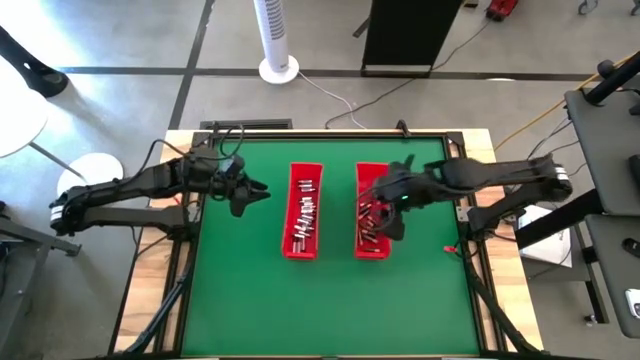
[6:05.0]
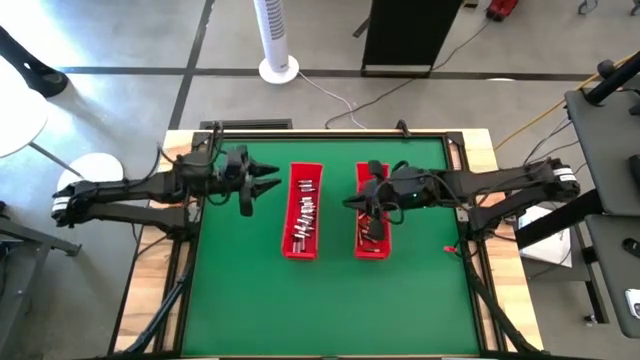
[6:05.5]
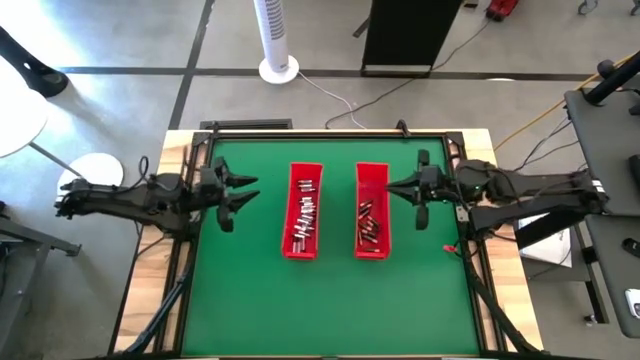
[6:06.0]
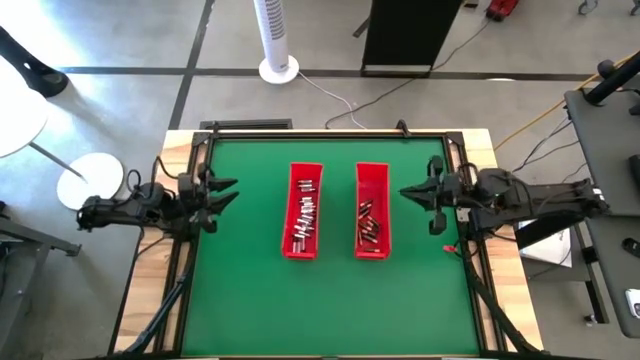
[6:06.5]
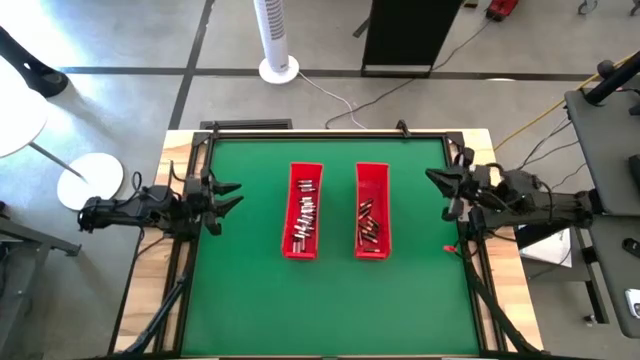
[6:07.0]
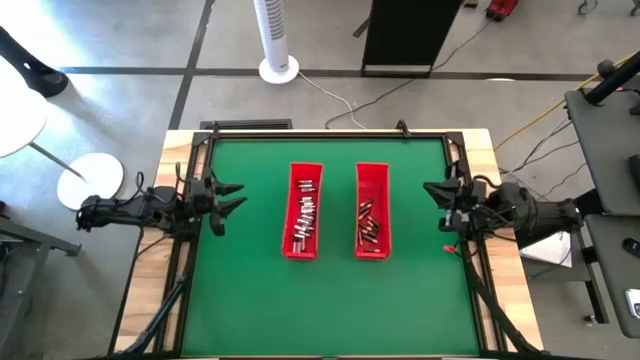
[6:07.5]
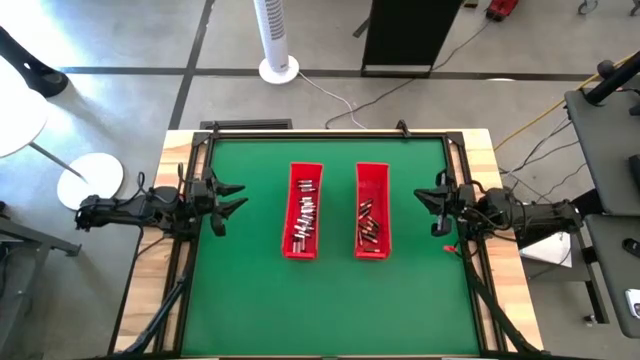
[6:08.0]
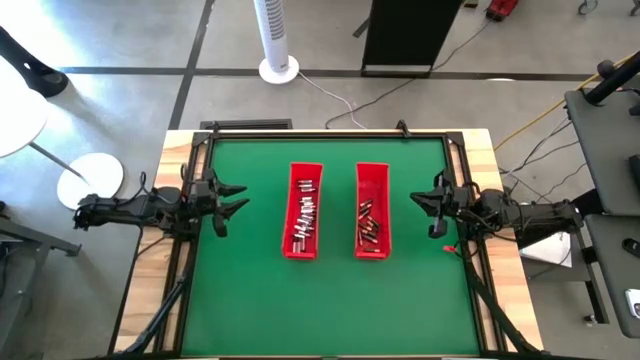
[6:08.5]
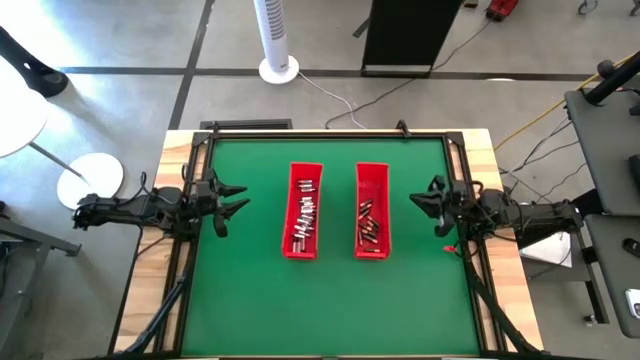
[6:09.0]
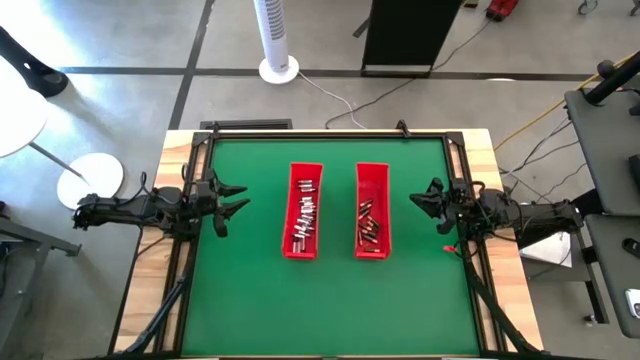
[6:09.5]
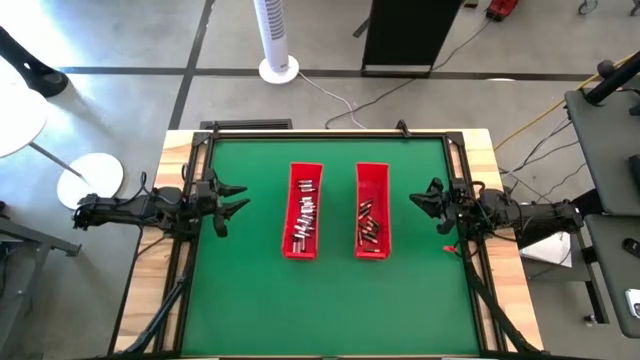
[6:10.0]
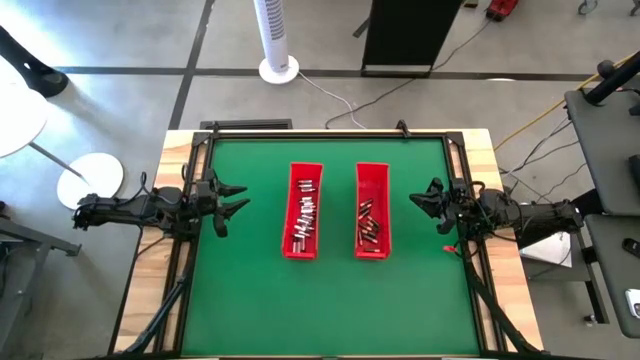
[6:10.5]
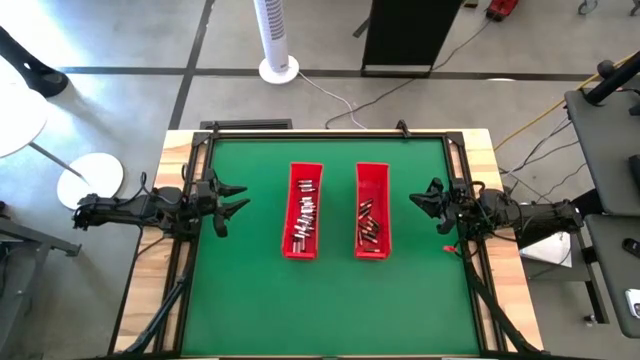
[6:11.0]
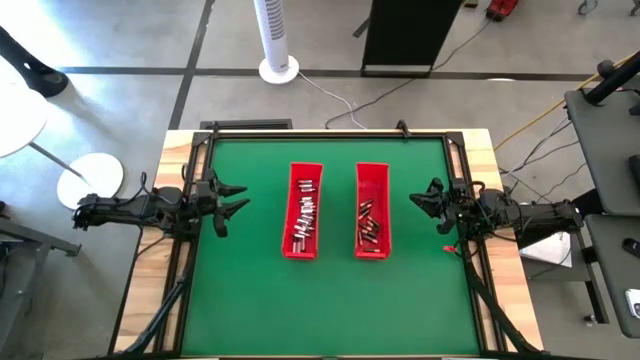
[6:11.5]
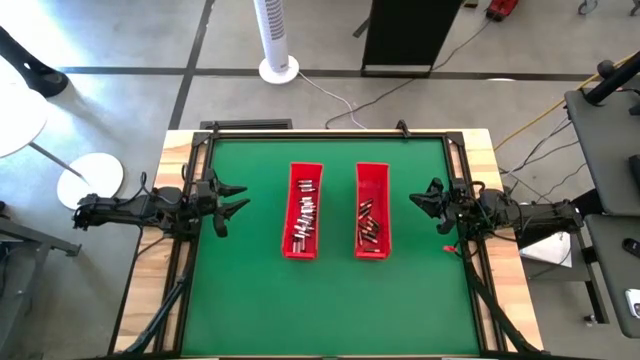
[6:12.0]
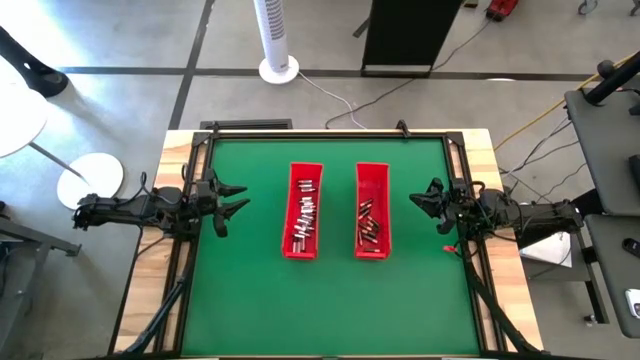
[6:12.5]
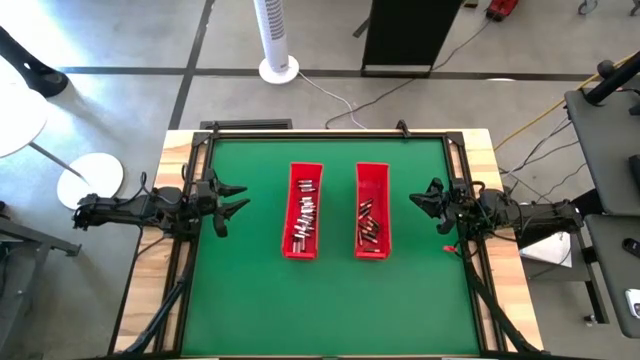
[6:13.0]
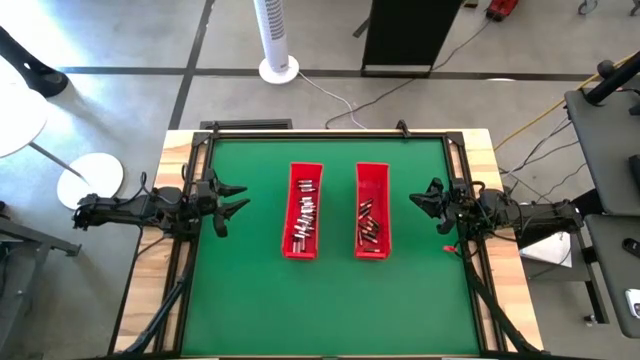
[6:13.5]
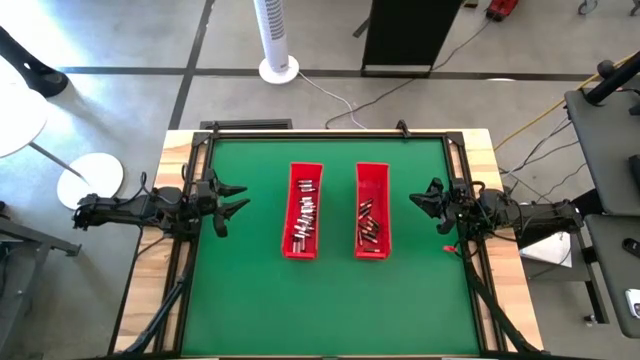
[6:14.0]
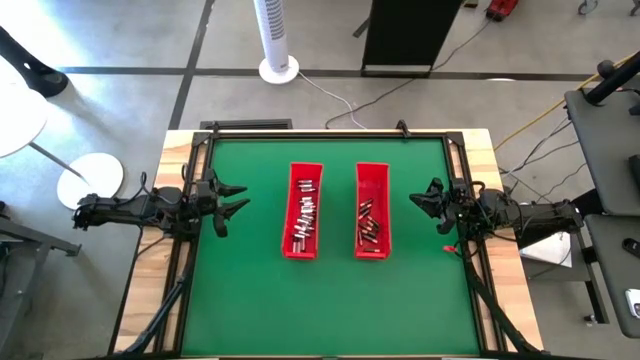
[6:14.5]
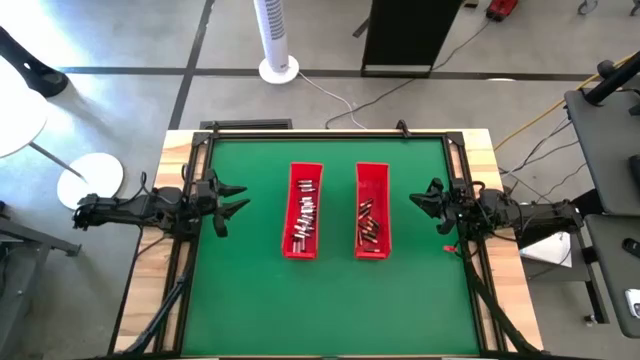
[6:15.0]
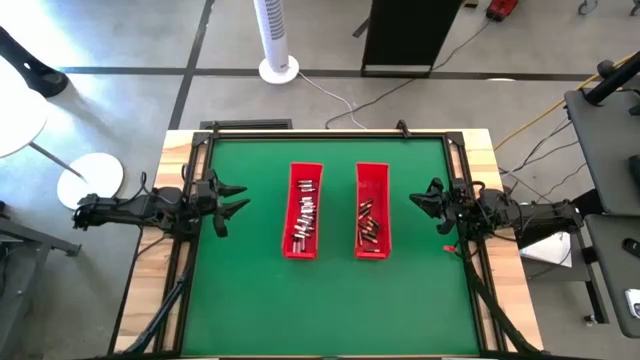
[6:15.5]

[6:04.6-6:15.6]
Task: Sort batteries
Return to Home Position

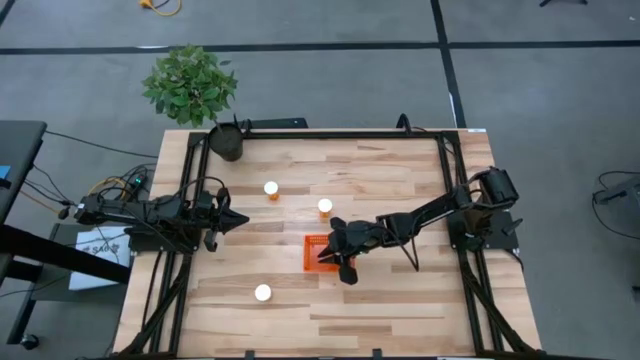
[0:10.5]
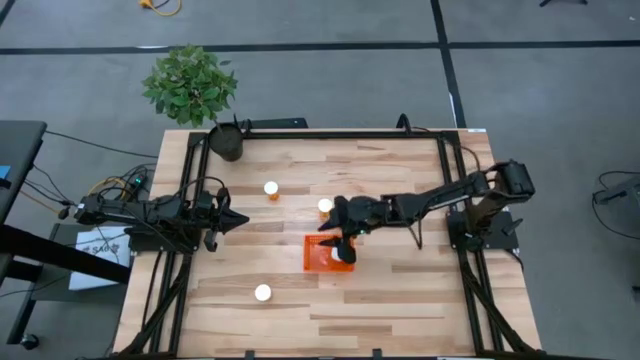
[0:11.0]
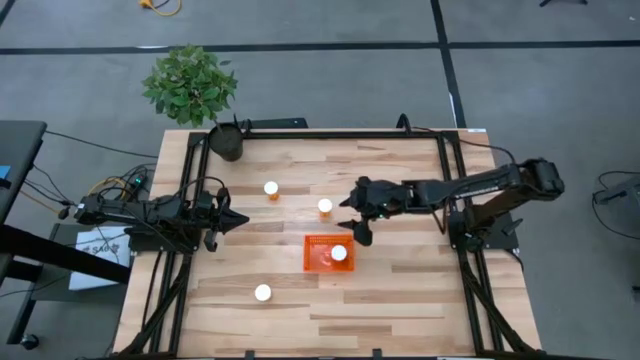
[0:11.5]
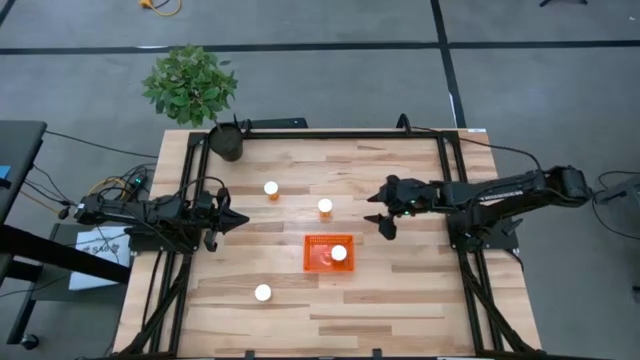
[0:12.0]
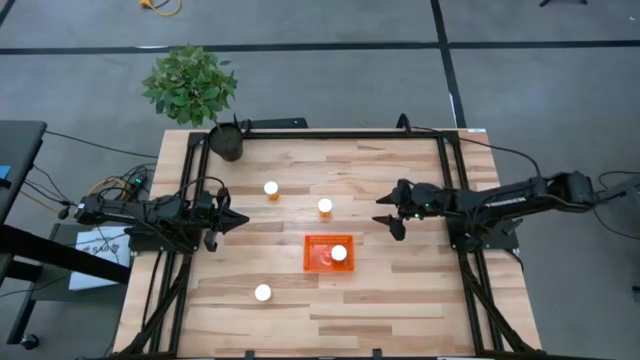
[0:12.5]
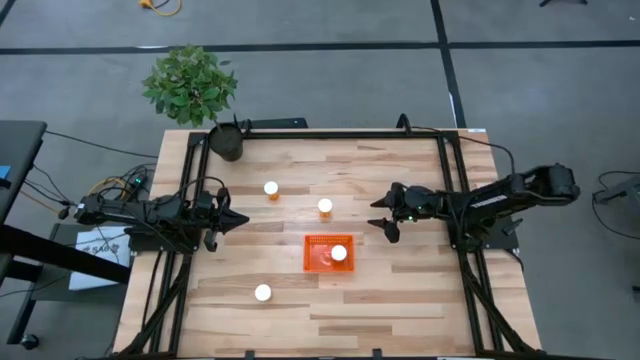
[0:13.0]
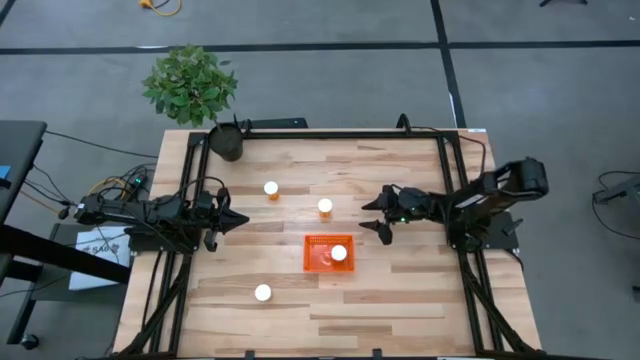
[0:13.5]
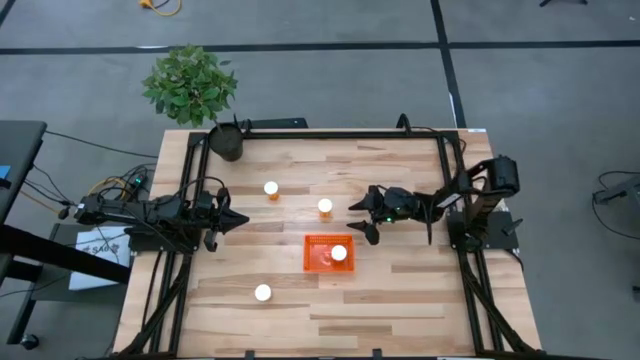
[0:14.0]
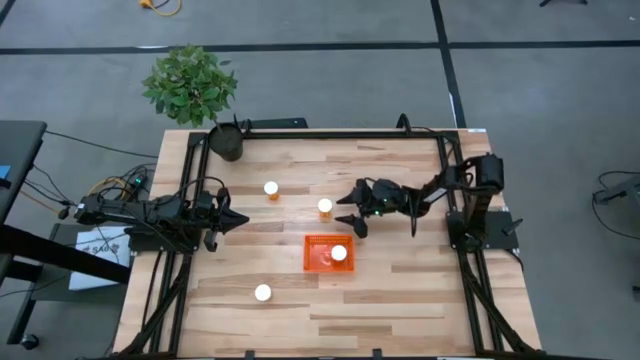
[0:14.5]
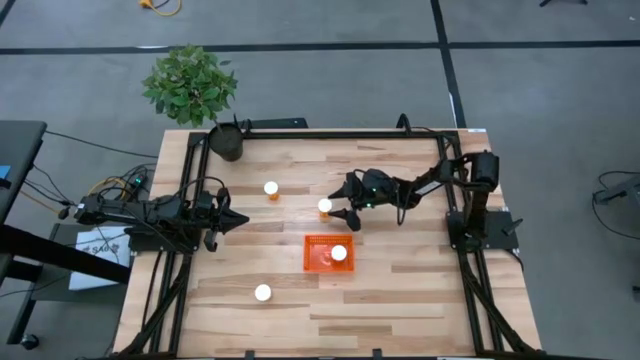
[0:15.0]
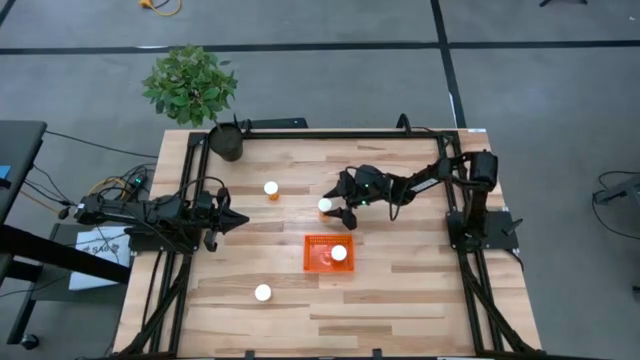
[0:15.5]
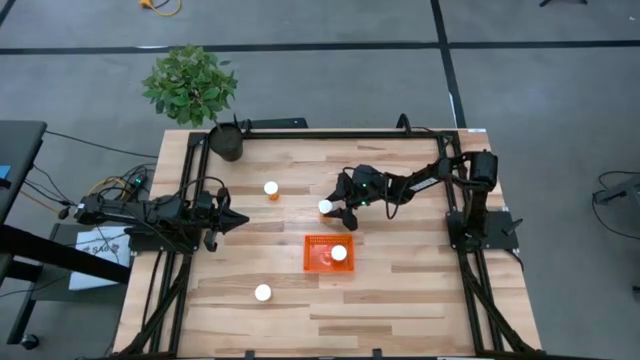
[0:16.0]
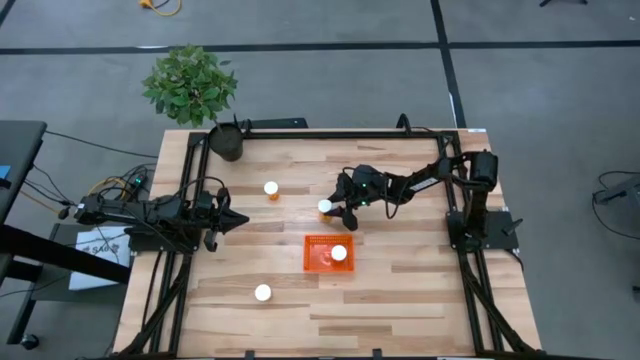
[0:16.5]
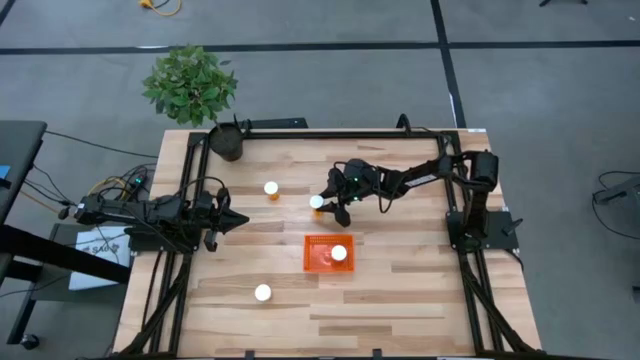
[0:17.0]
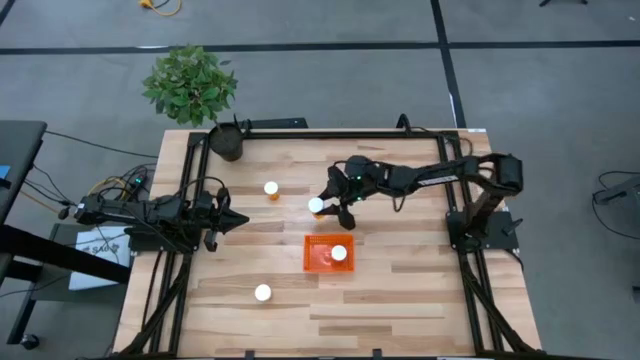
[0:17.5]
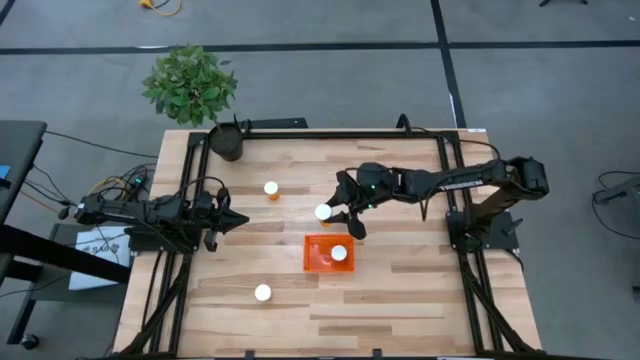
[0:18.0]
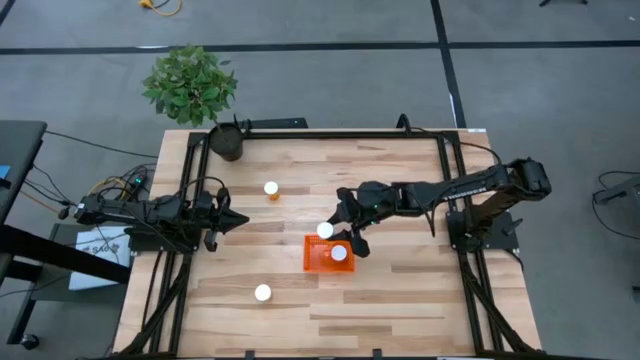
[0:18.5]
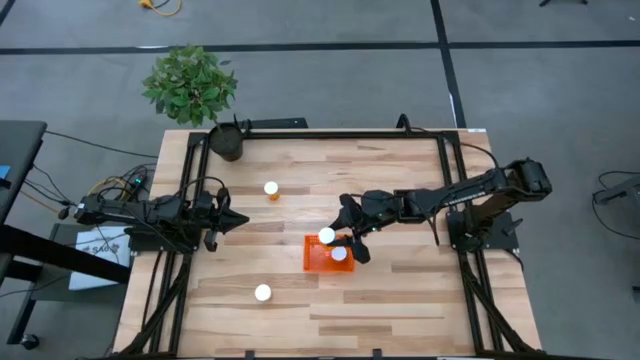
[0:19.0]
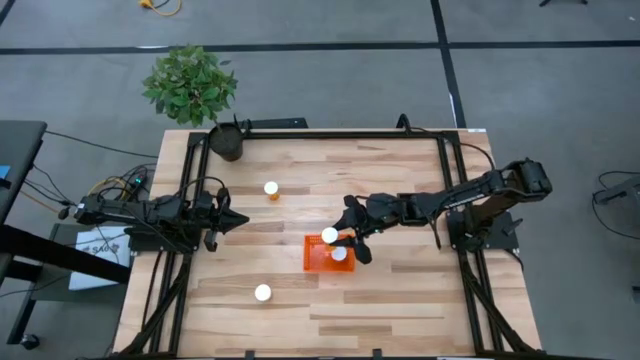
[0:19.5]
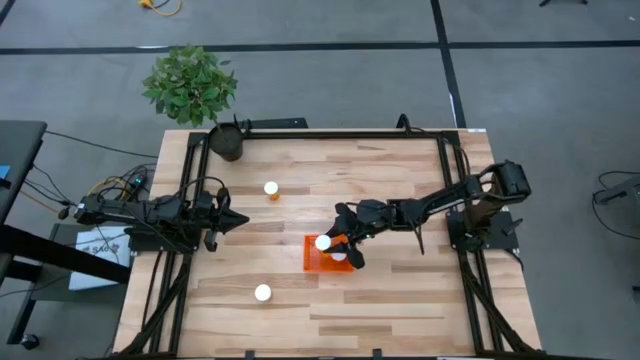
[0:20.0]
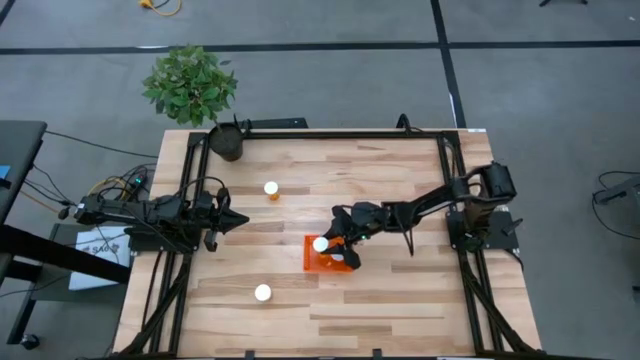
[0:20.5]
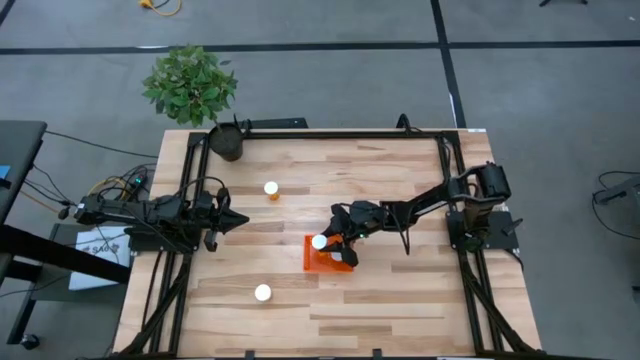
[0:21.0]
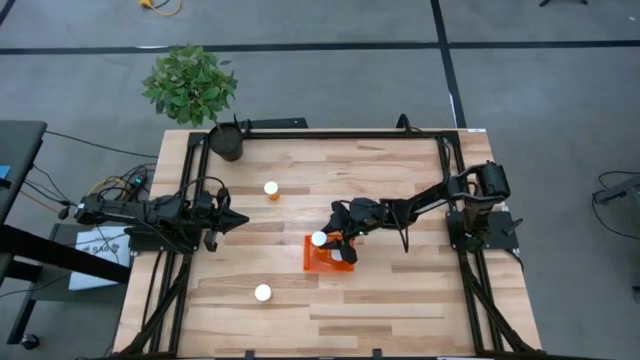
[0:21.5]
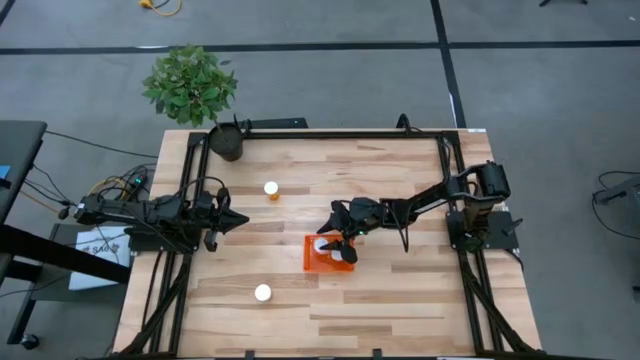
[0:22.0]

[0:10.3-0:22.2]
Task: Pick and place pill bottles into a basket
Put the orange pill bottle into the orange bin
